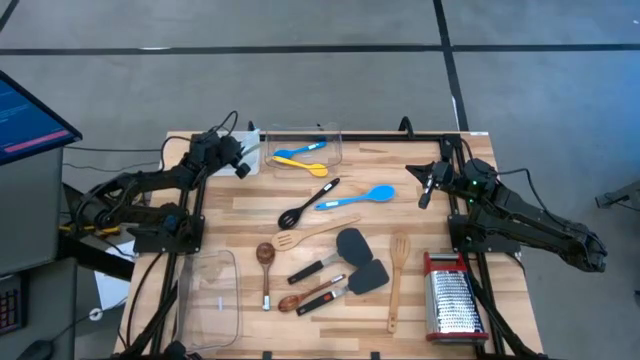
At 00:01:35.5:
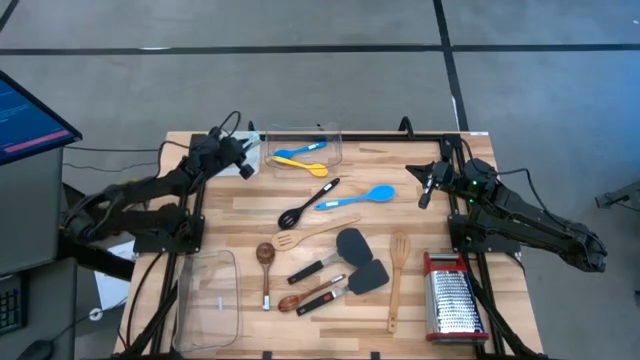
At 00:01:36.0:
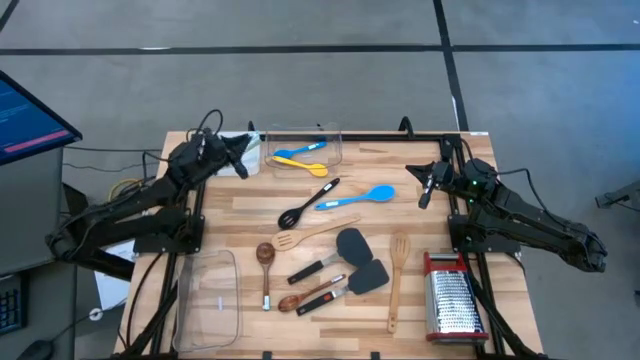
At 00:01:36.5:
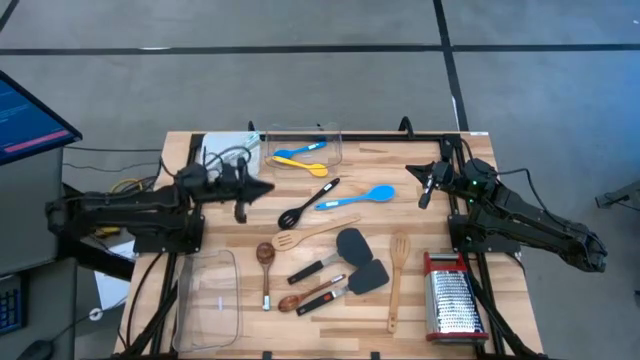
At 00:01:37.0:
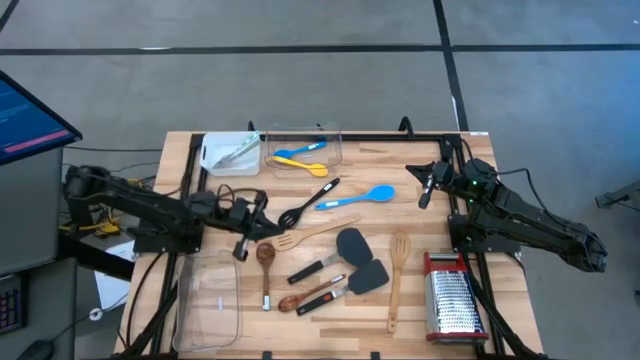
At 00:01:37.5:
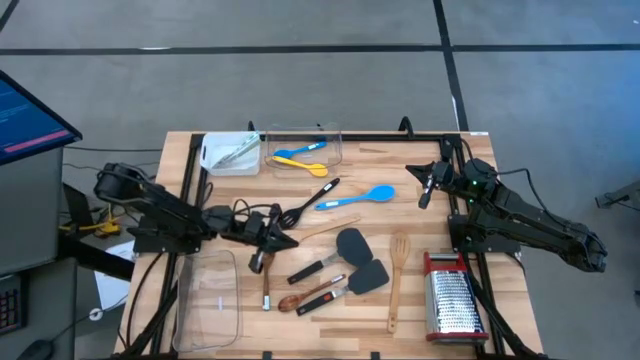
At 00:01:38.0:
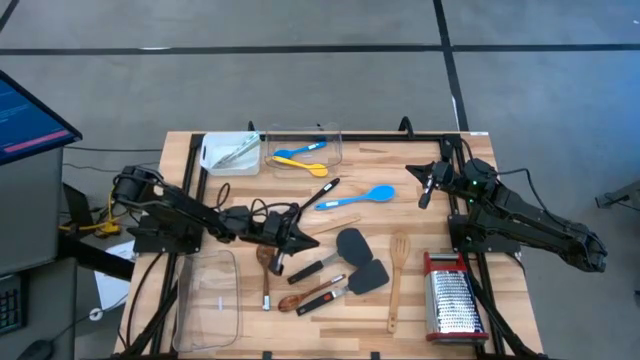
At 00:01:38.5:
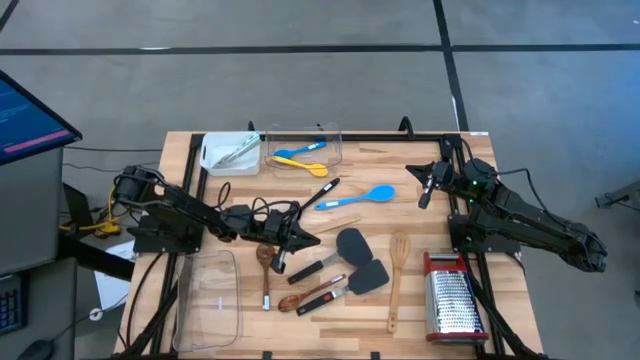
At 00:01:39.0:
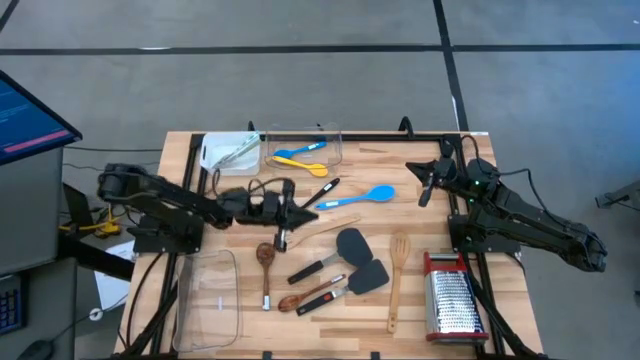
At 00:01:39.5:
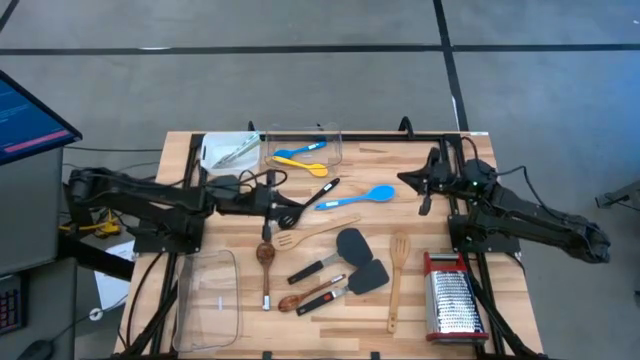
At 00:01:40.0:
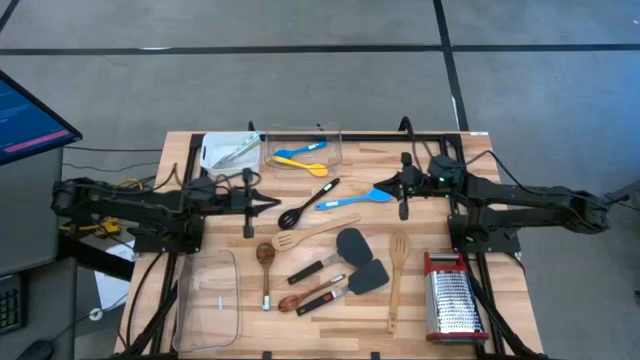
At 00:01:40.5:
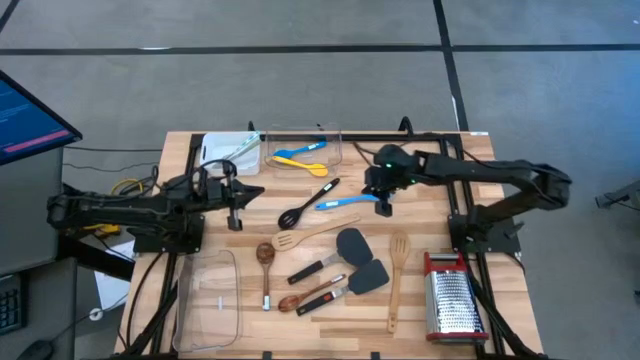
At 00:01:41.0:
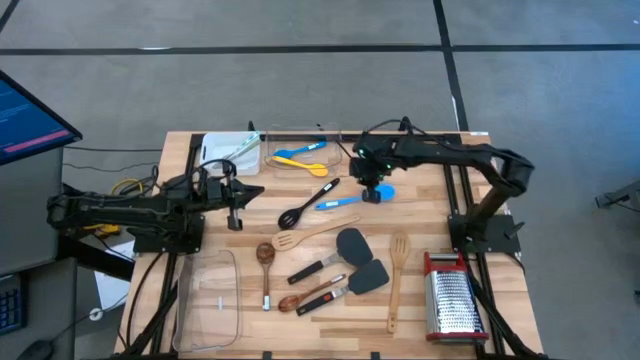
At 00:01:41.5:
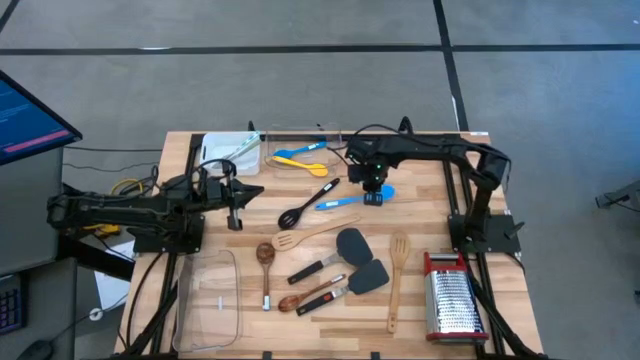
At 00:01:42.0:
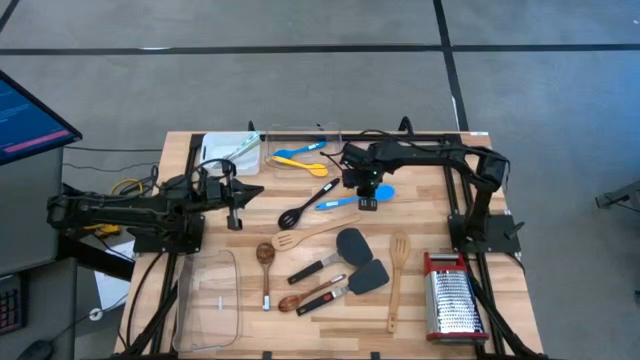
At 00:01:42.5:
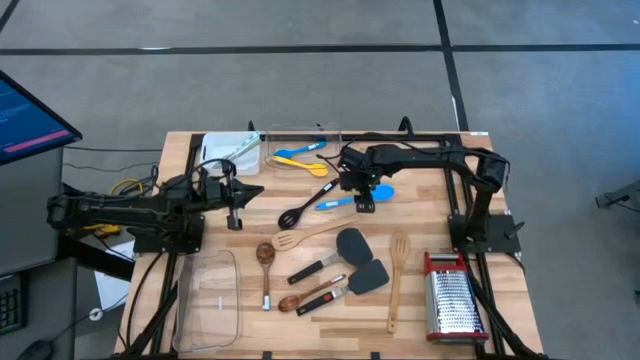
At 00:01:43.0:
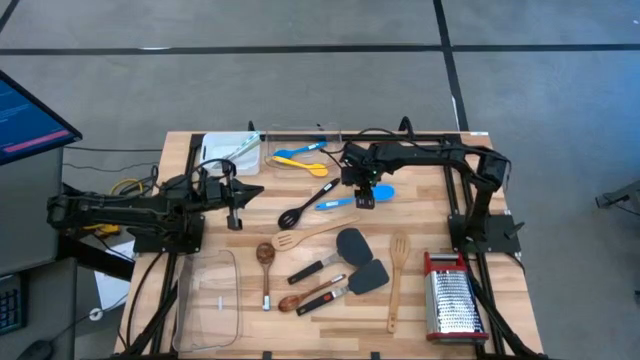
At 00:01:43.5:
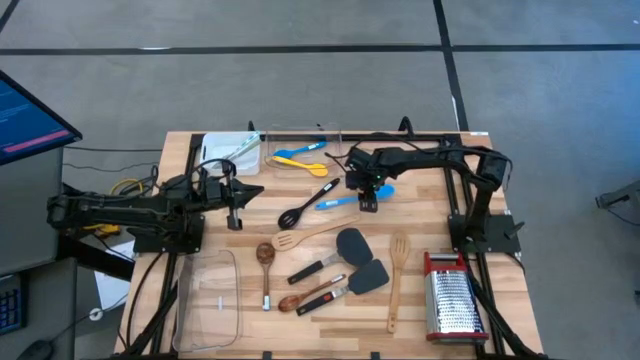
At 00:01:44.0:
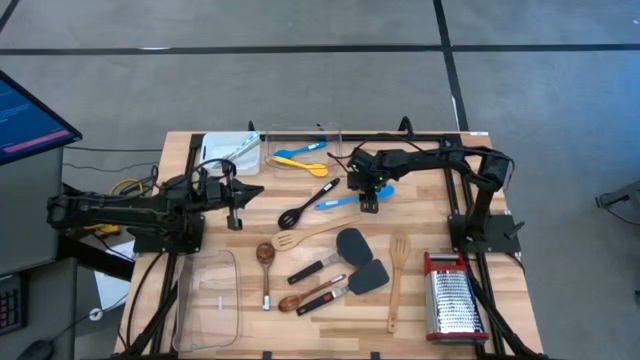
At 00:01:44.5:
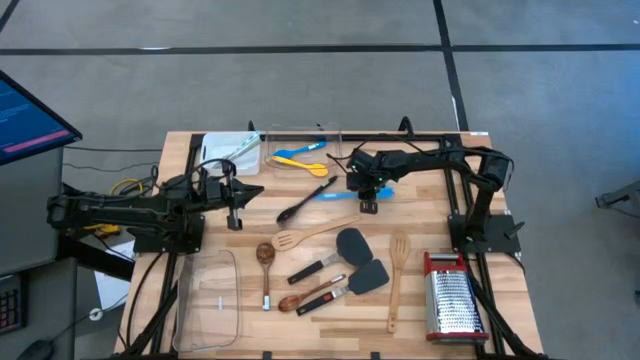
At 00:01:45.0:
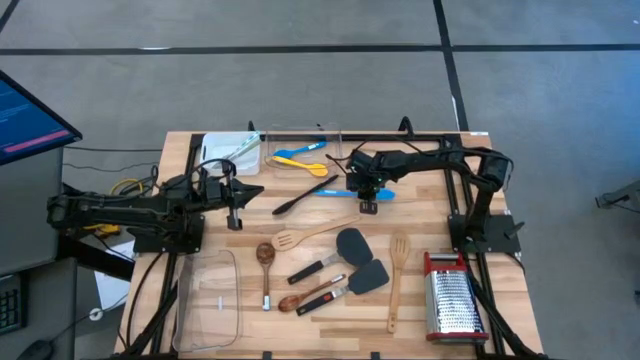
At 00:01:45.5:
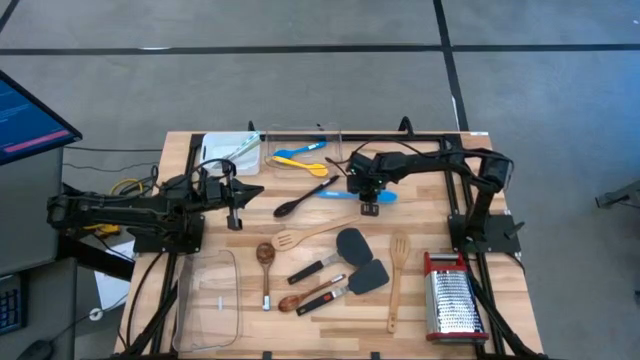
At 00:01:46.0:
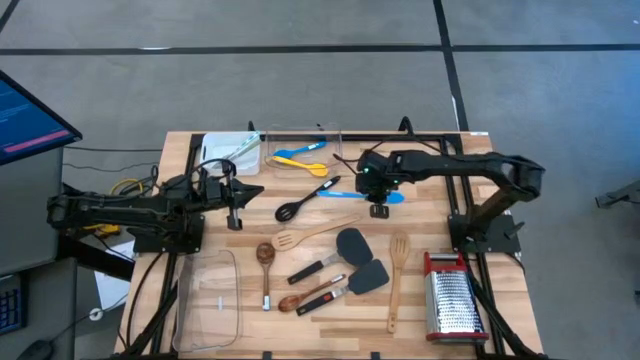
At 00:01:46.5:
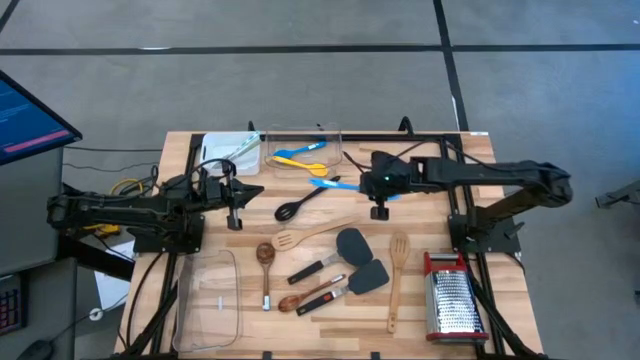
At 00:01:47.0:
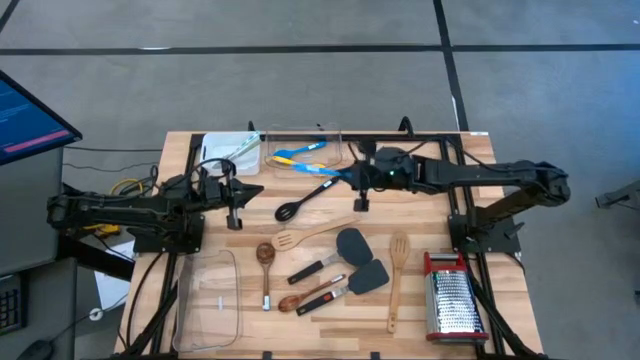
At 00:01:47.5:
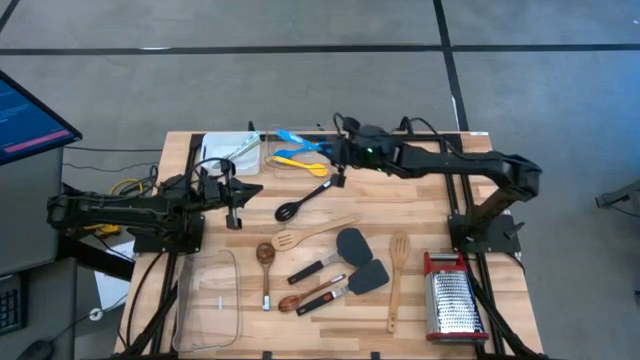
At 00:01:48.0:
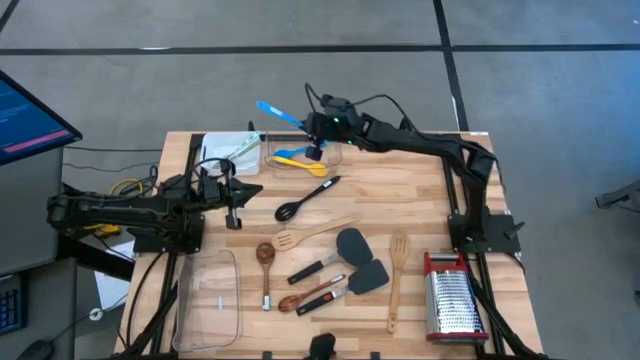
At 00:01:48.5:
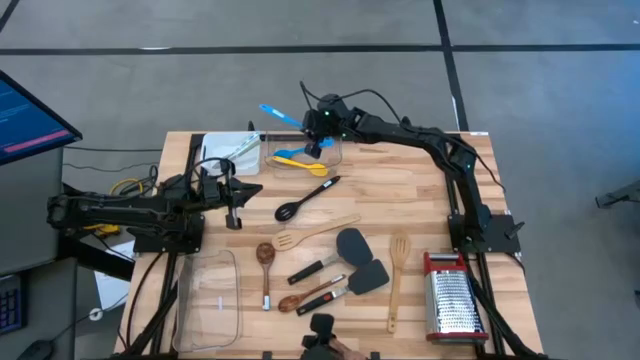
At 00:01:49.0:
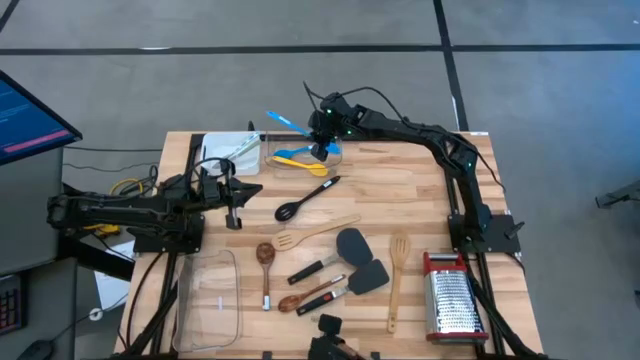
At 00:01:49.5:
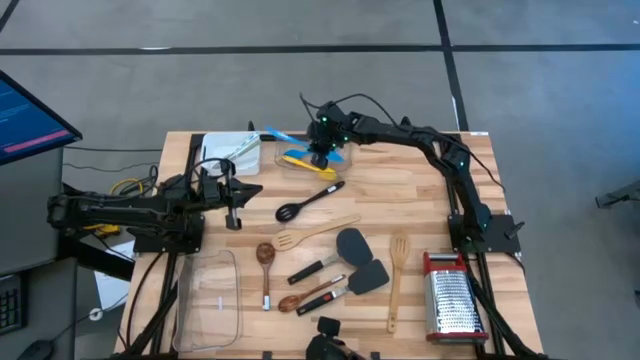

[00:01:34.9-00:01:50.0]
Task: Pick & Place Kitchen Items
Put the blue serving spoon into the top transparent bin

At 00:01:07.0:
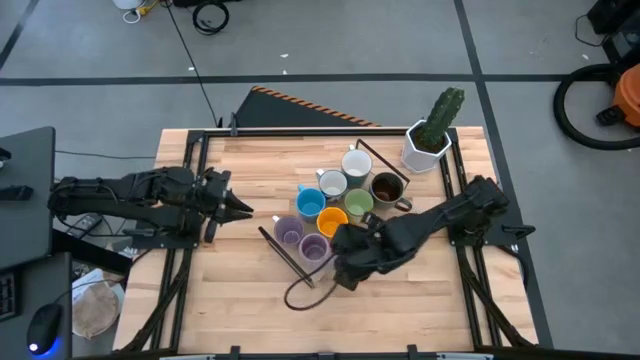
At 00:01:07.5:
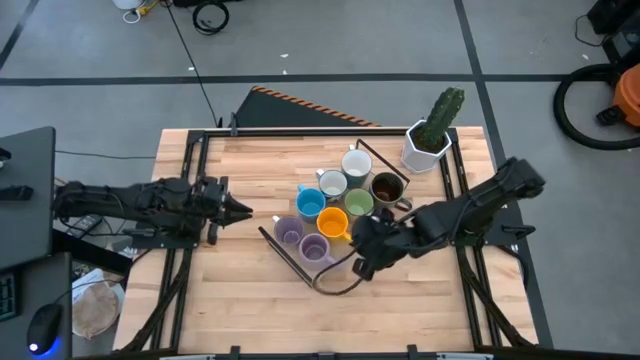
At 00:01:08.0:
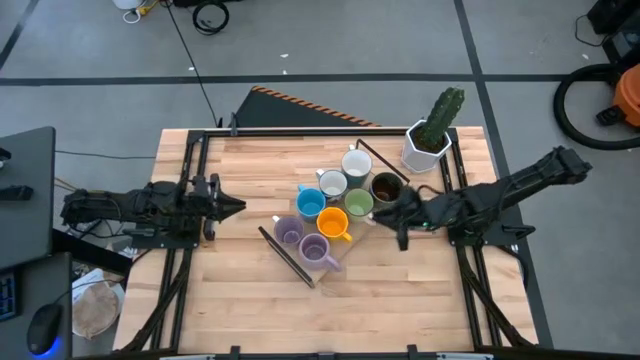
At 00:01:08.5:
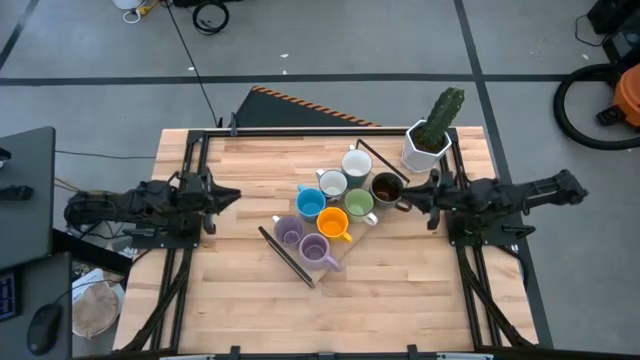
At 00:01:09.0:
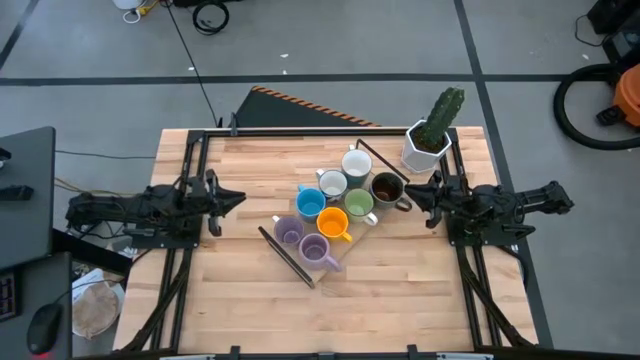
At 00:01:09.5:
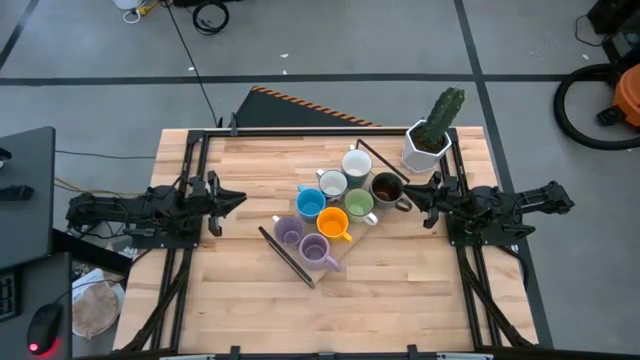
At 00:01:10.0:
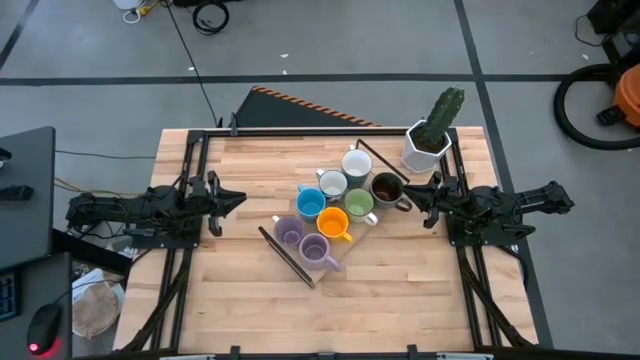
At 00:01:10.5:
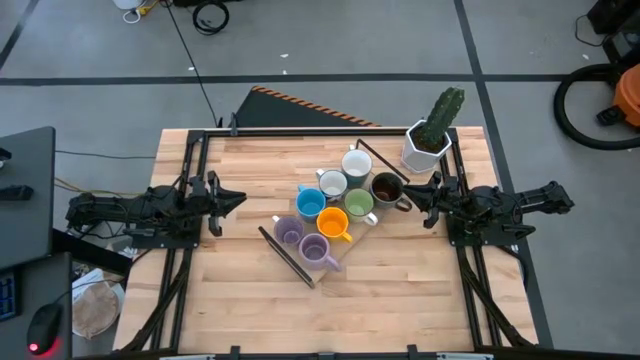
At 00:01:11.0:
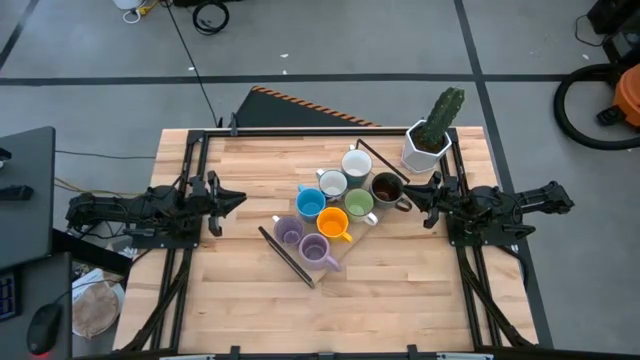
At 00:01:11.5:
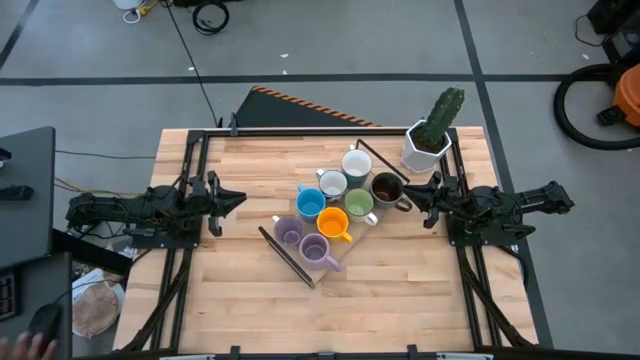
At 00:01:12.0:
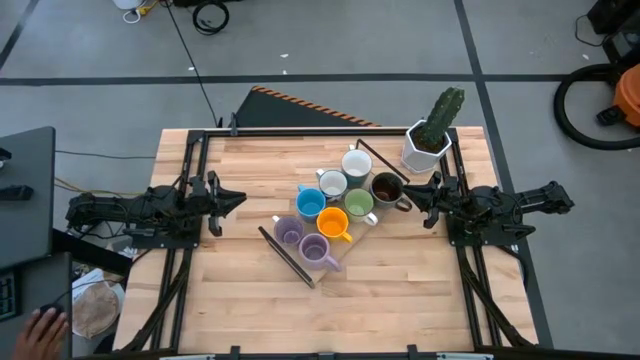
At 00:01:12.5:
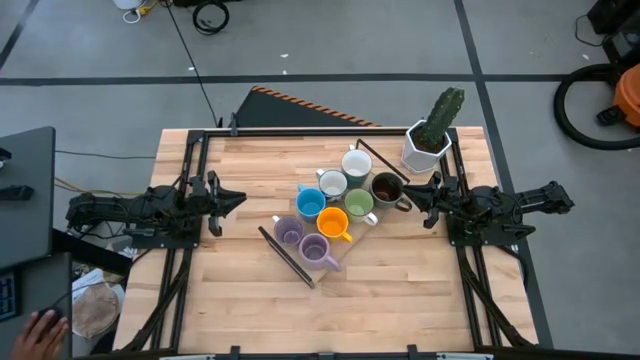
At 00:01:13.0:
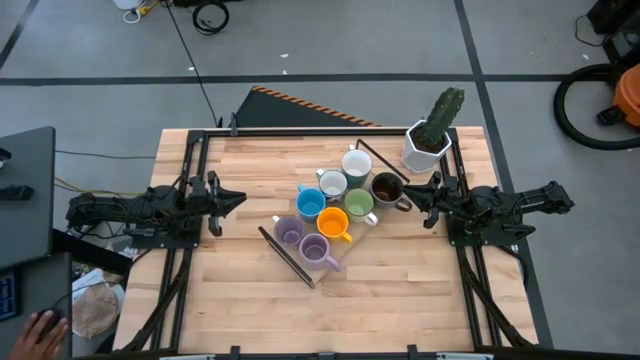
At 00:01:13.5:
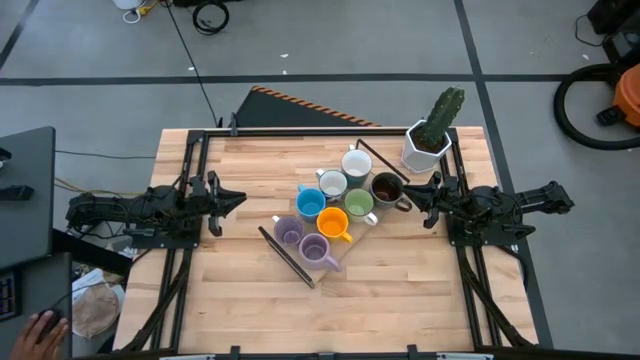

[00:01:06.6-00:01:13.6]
Task: Place coffee mugs
Return to Home Position
